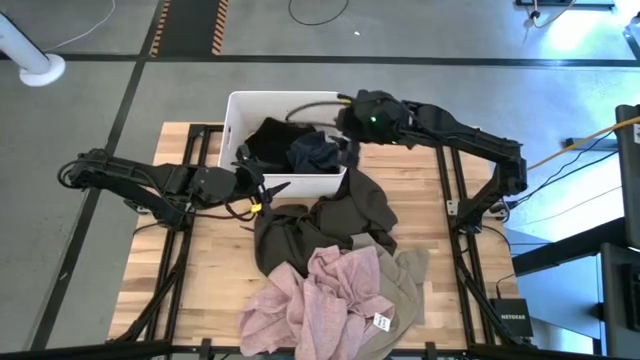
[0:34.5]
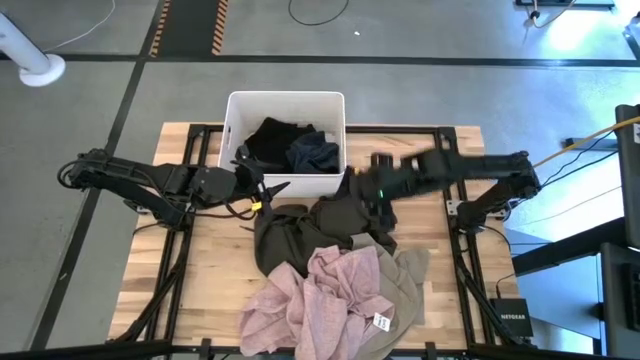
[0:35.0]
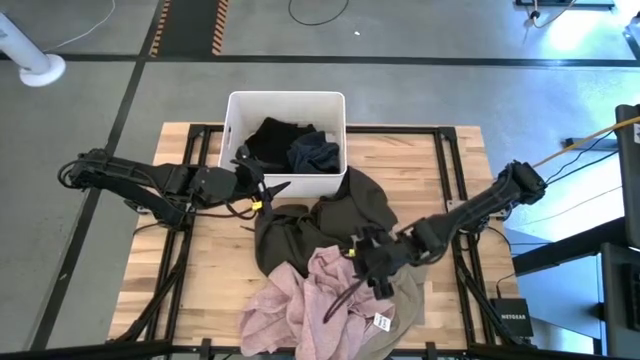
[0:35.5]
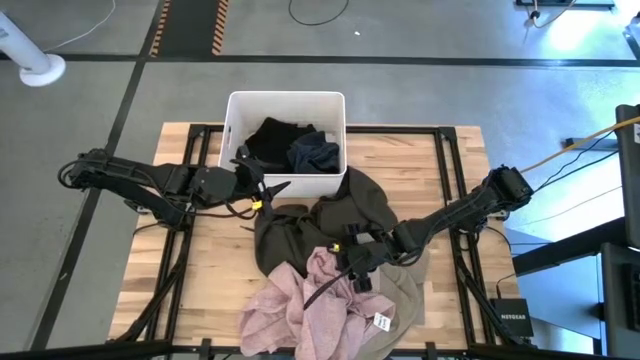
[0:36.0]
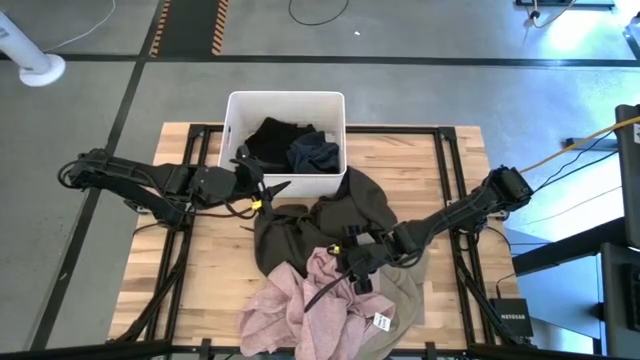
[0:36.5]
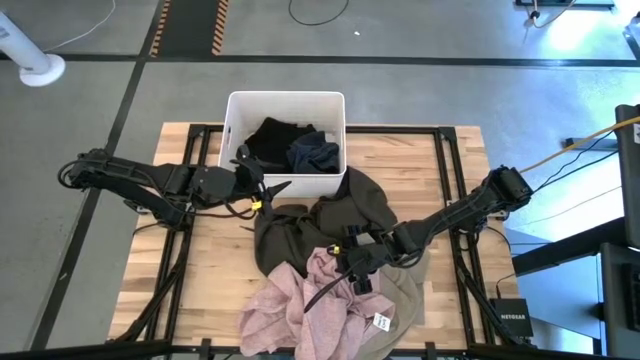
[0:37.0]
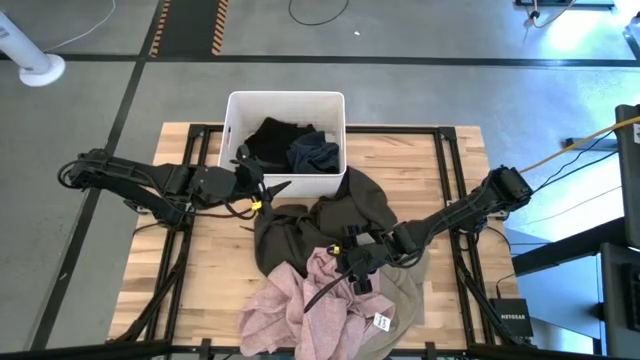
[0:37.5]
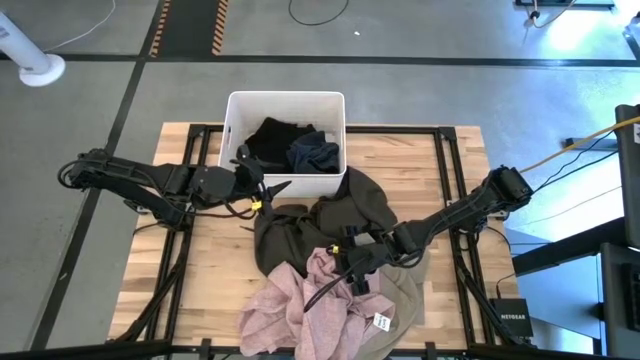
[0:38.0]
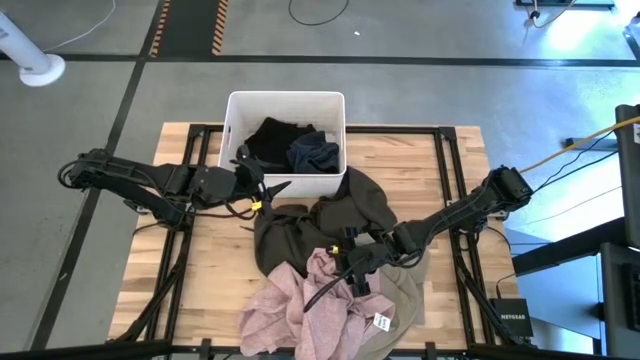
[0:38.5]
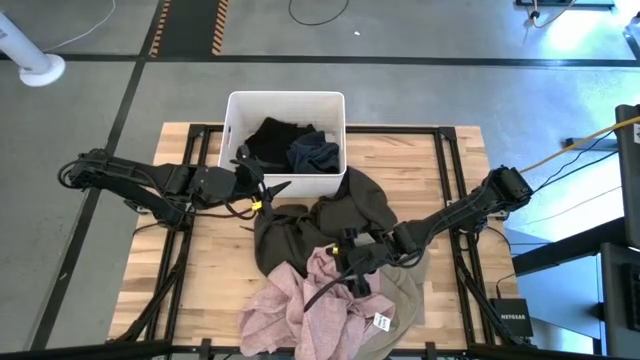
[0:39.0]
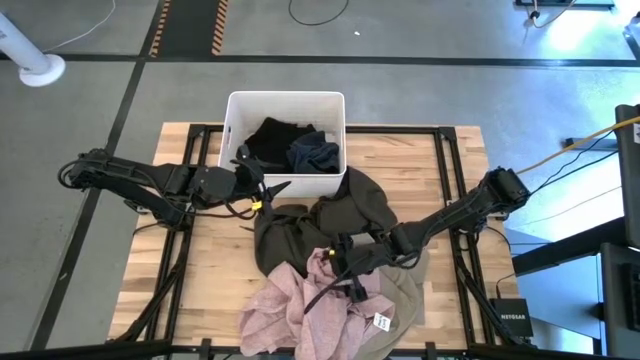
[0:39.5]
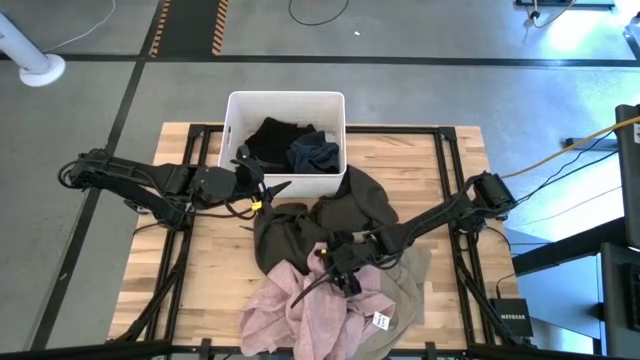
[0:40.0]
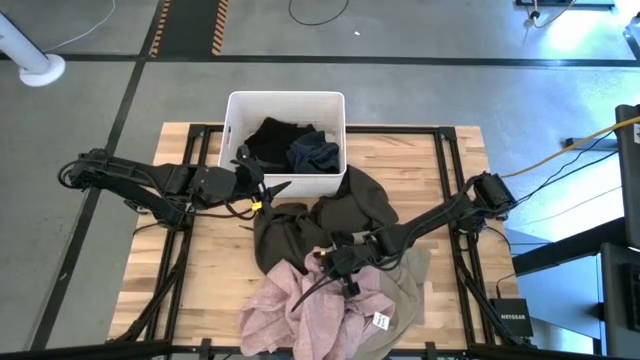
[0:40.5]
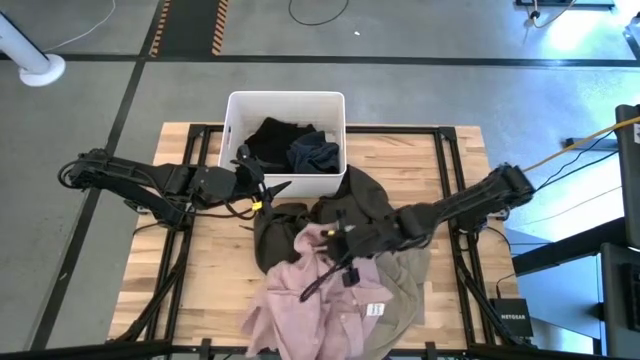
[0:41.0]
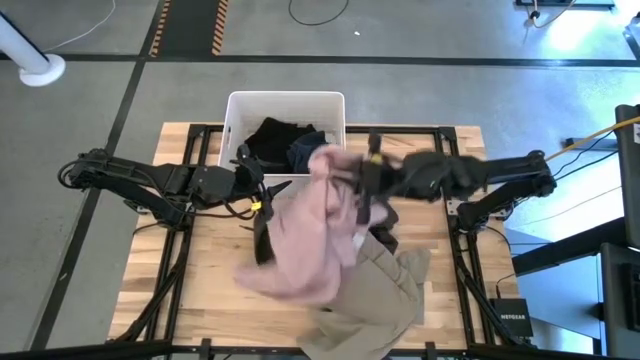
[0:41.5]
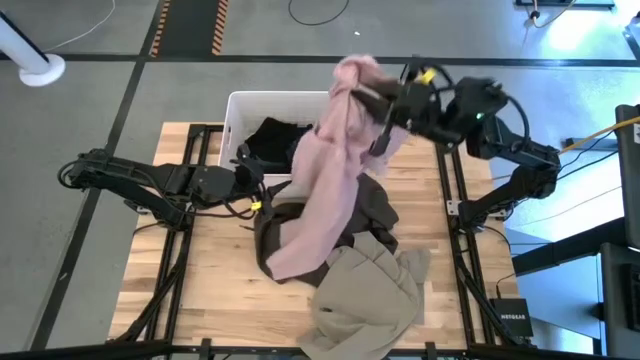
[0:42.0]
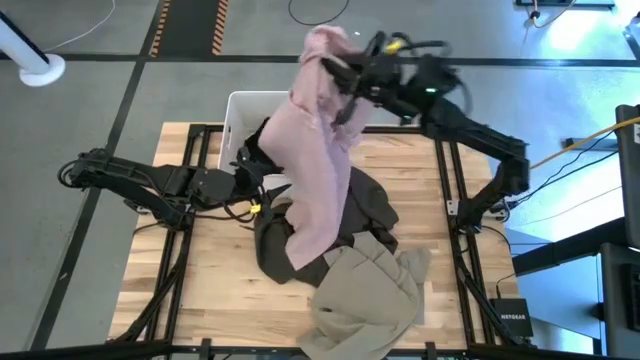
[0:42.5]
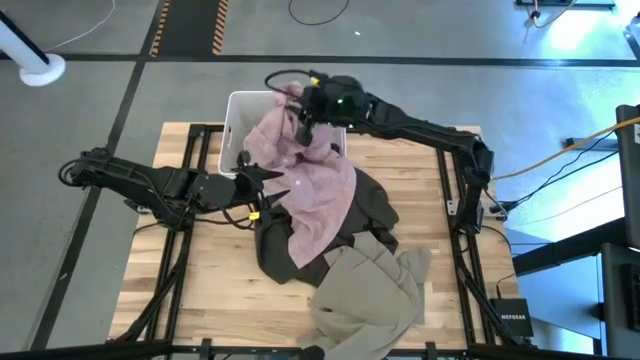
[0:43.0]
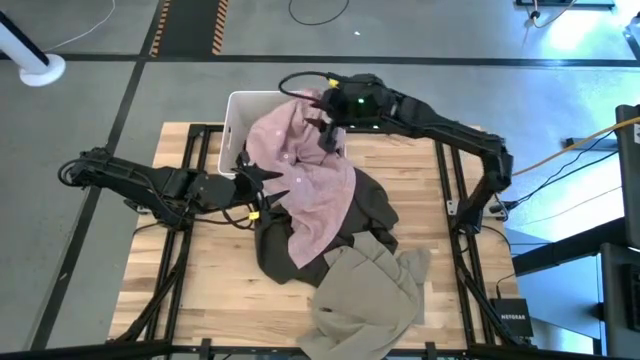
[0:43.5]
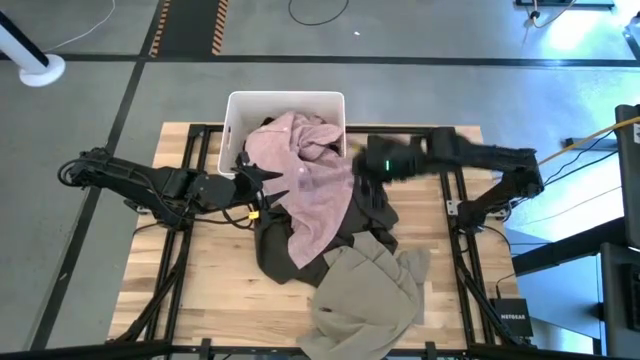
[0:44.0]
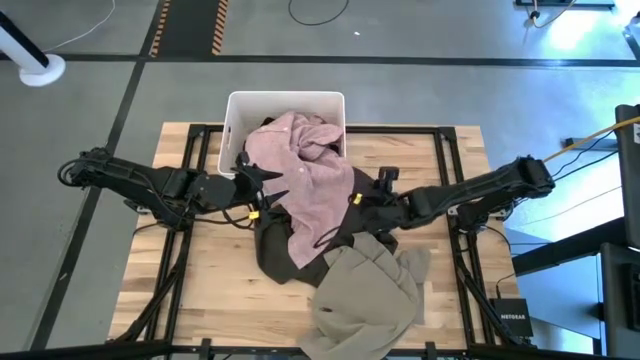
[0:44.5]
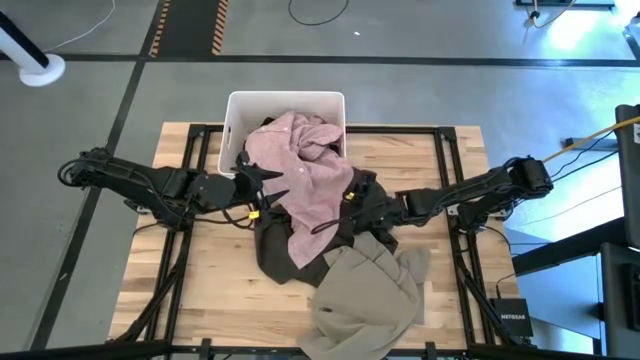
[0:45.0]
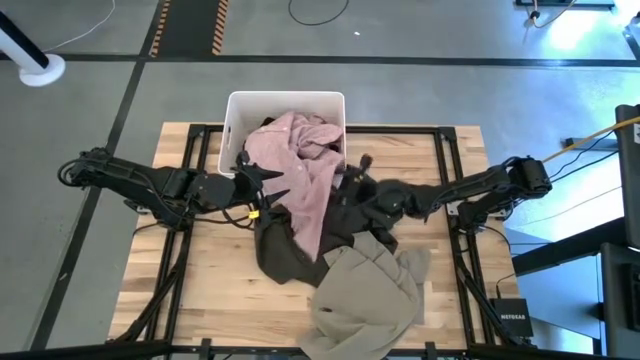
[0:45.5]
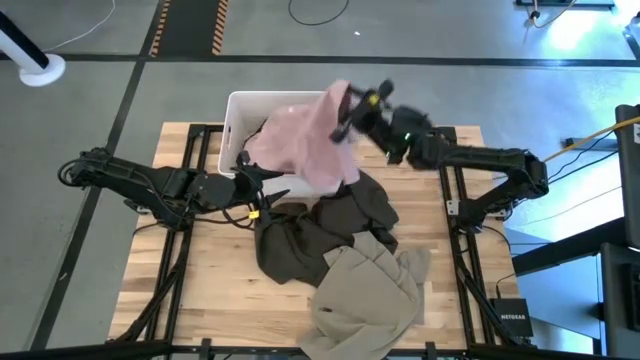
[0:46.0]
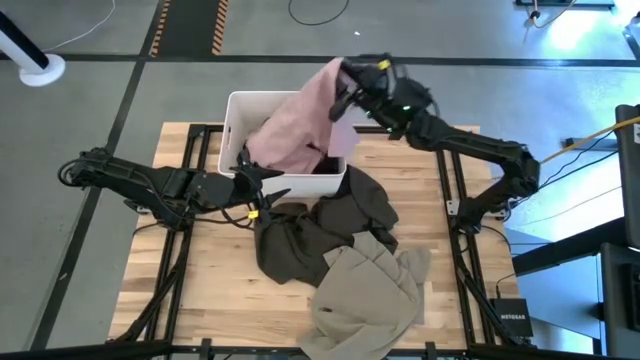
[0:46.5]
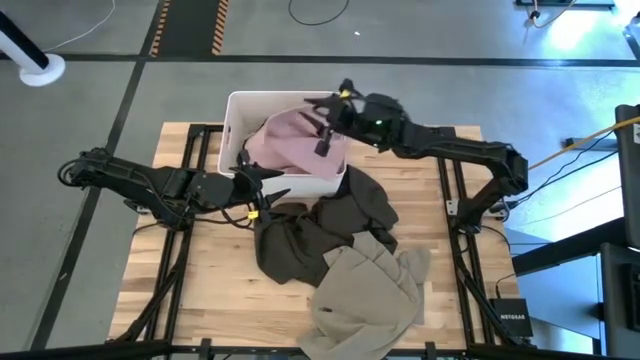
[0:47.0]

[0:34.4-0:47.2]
Task: Sort clothes
Put the pink polo shirt into the white laundry bin

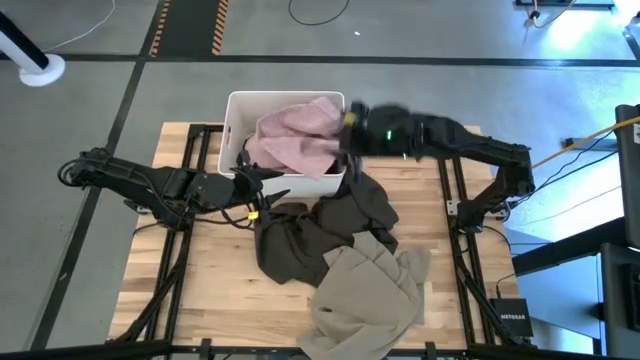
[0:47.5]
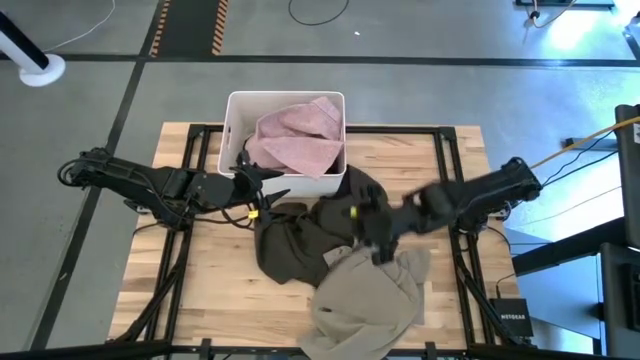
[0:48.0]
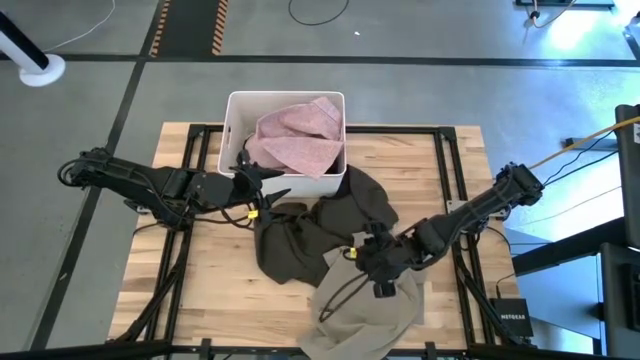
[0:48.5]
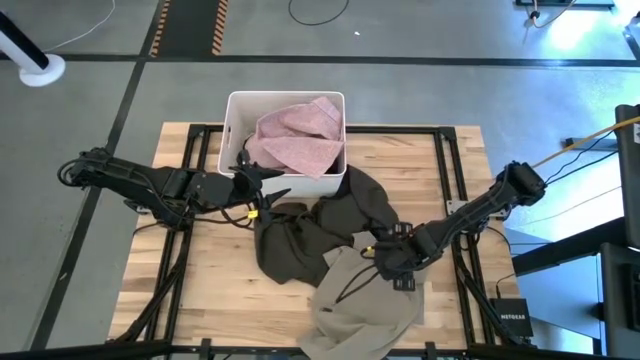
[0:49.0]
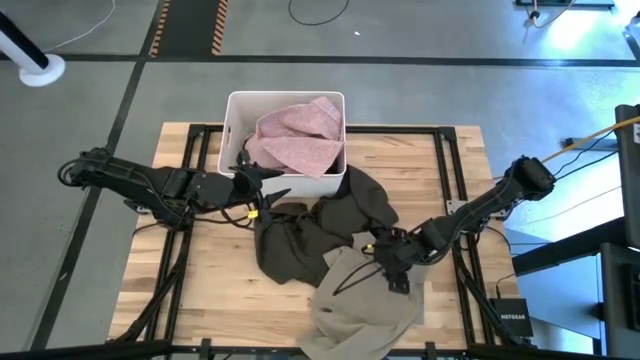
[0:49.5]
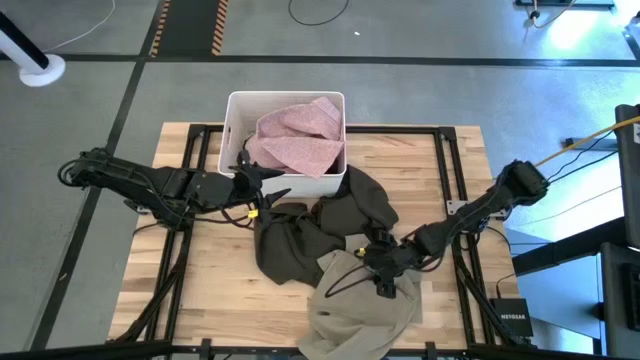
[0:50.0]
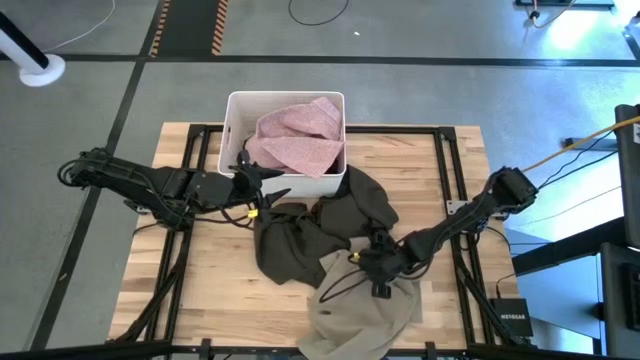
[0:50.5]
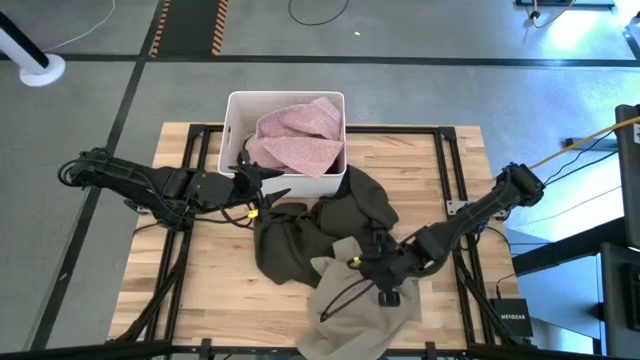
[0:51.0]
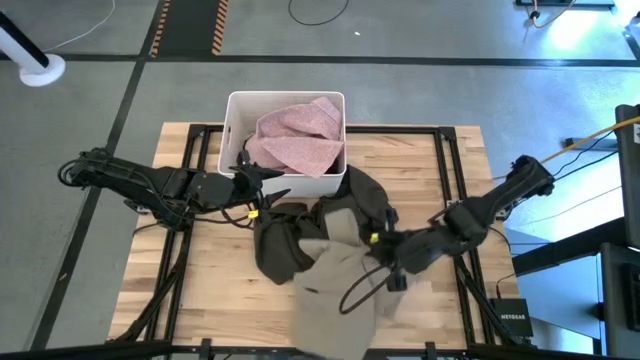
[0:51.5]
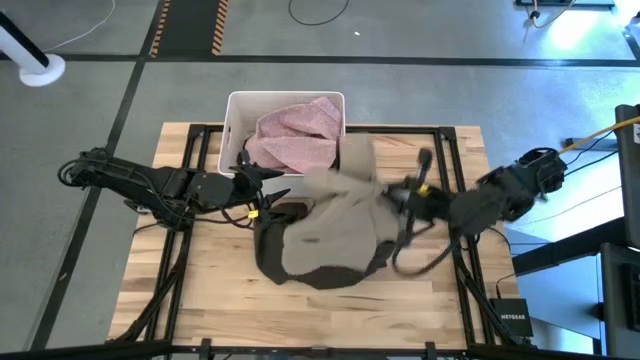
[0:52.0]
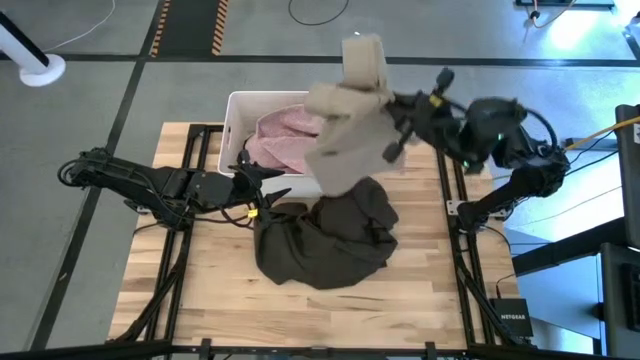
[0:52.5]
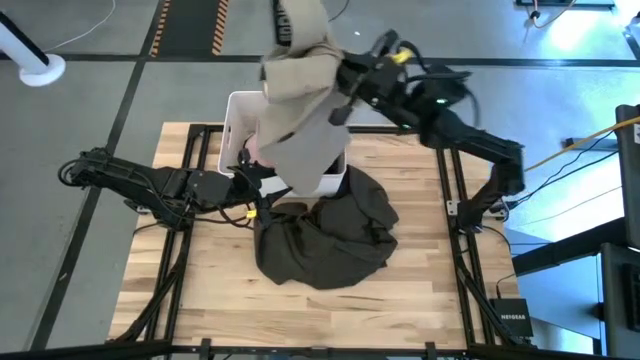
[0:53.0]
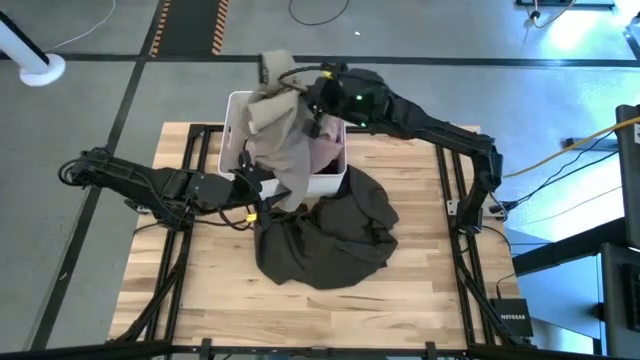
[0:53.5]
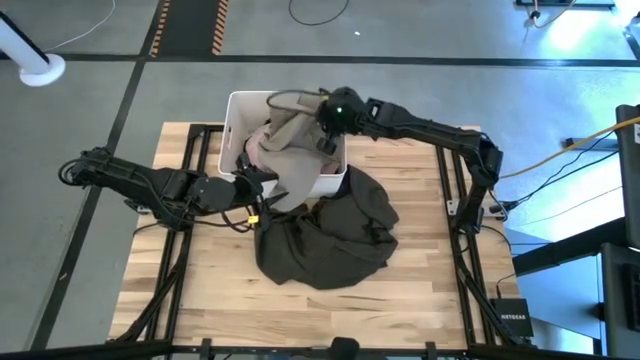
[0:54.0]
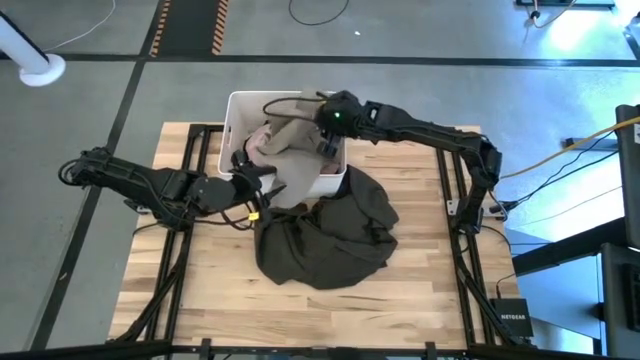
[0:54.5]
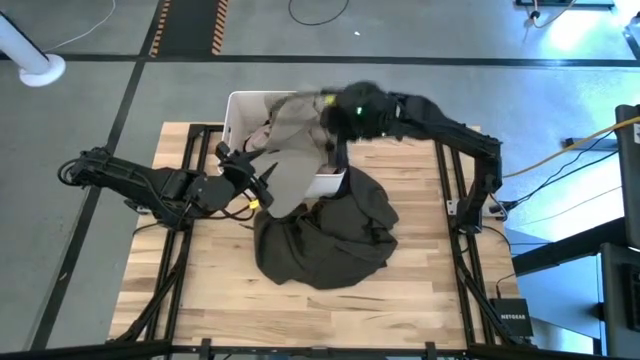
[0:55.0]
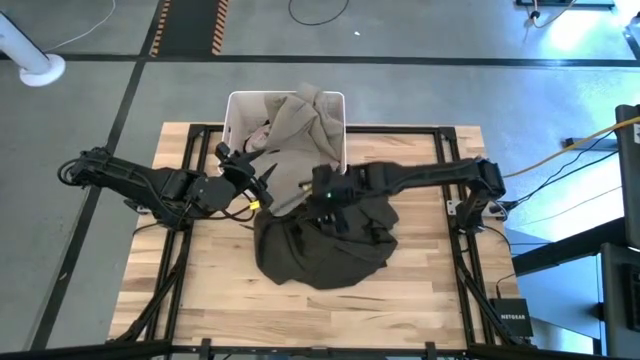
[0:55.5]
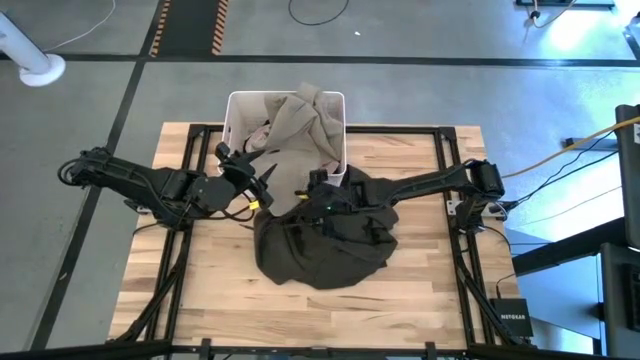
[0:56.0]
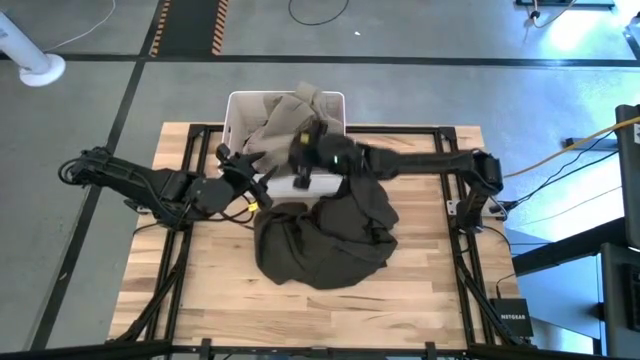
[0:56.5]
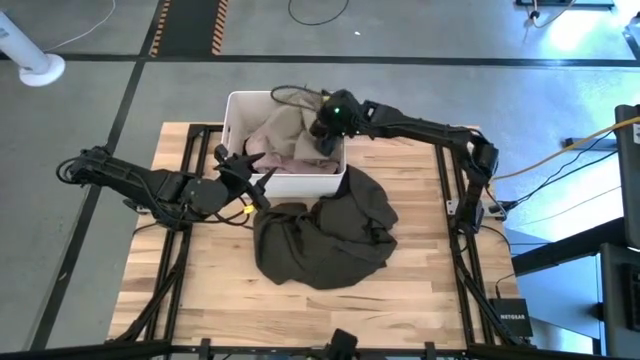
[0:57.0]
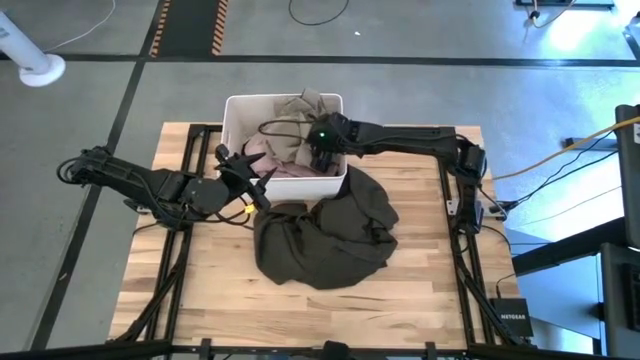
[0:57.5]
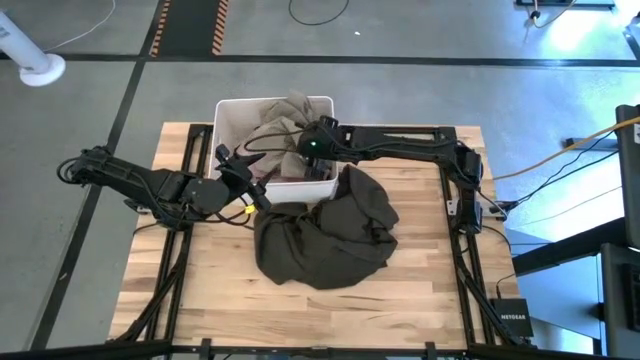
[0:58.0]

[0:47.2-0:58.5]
Put the brown shorts into the white laundry bin
